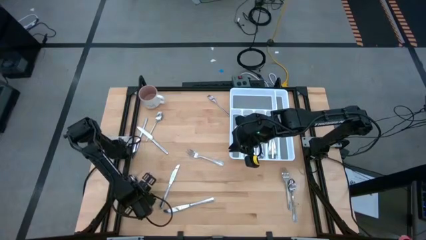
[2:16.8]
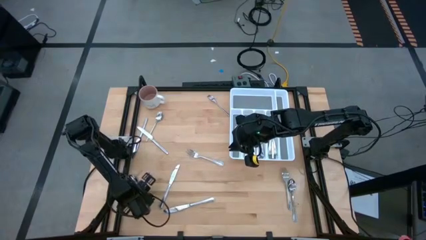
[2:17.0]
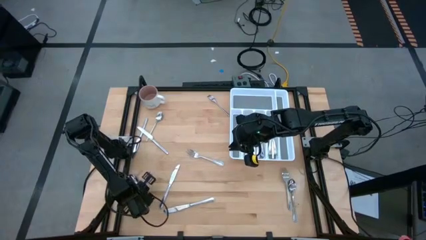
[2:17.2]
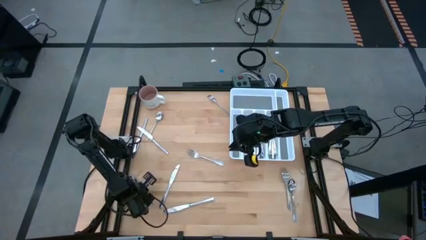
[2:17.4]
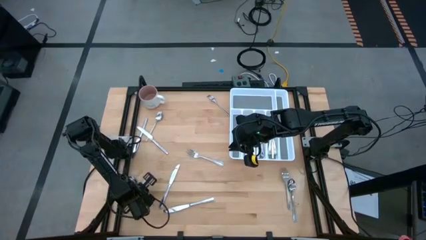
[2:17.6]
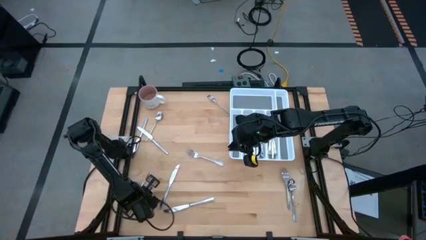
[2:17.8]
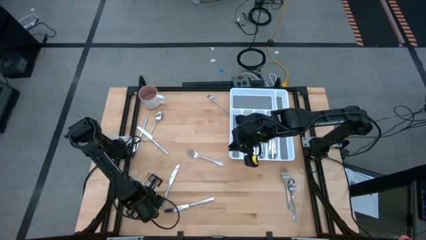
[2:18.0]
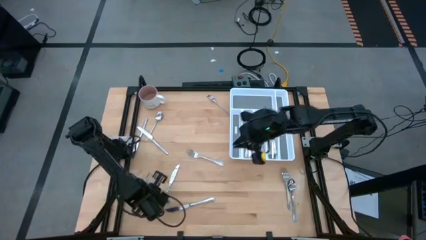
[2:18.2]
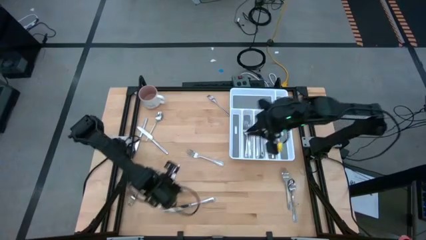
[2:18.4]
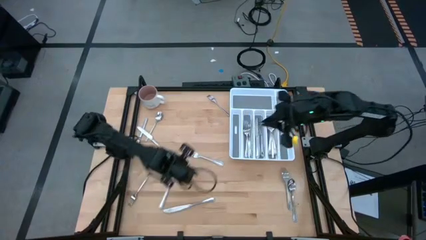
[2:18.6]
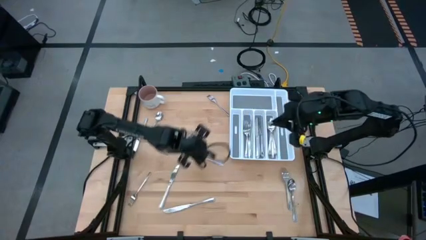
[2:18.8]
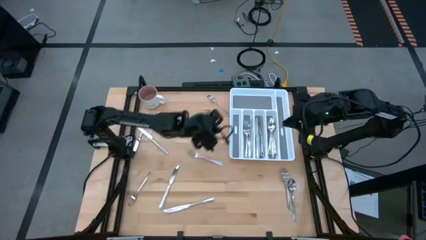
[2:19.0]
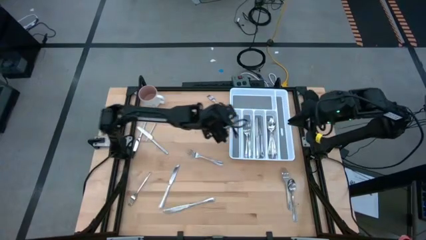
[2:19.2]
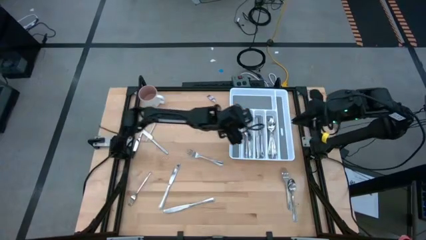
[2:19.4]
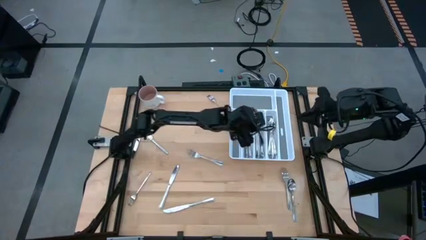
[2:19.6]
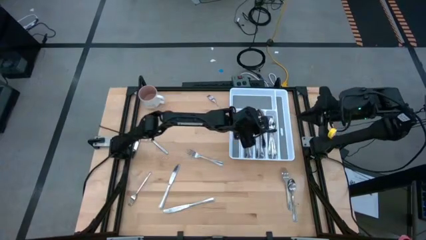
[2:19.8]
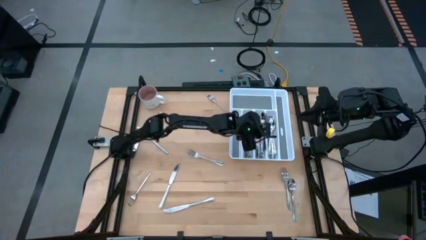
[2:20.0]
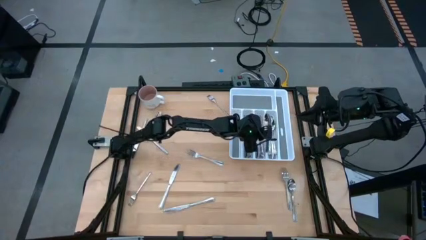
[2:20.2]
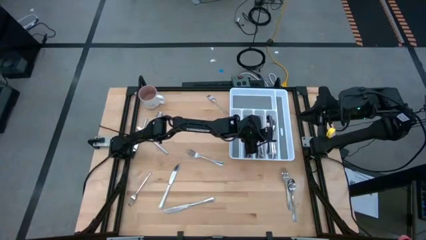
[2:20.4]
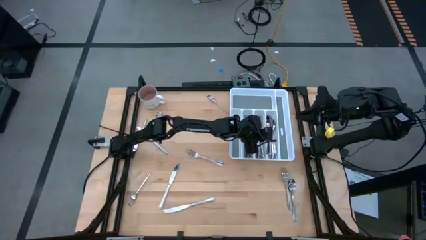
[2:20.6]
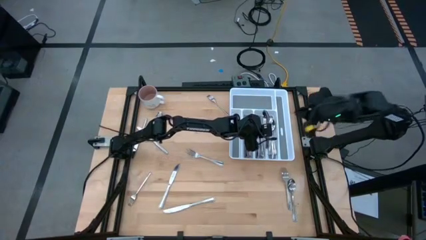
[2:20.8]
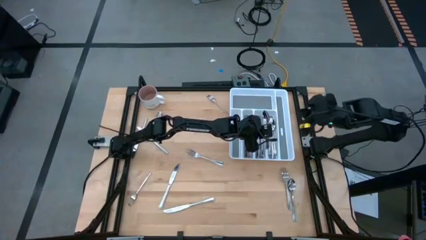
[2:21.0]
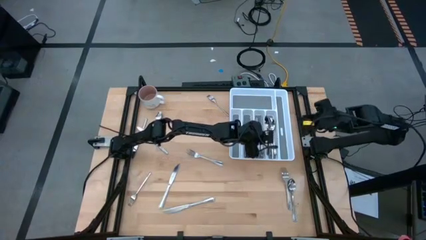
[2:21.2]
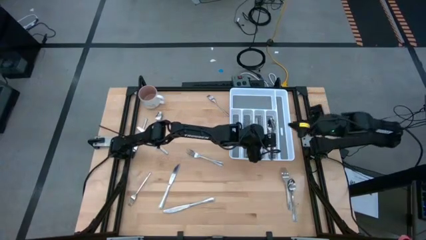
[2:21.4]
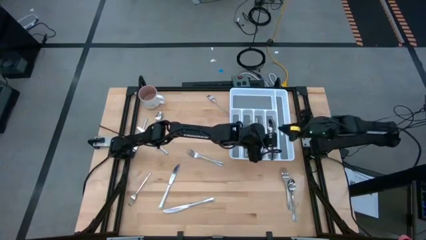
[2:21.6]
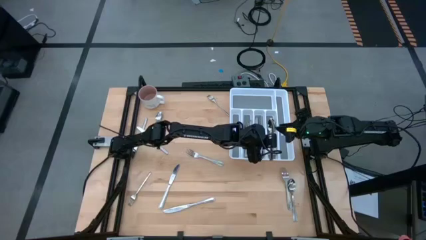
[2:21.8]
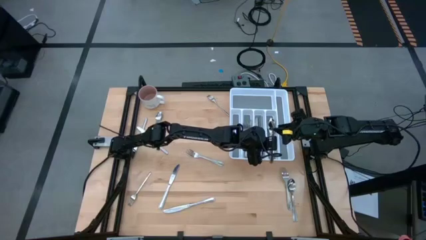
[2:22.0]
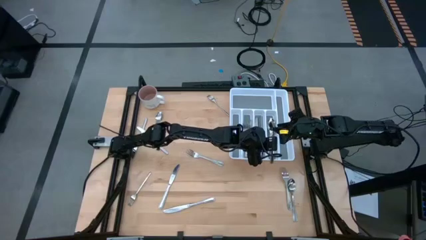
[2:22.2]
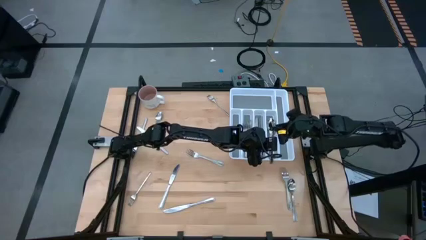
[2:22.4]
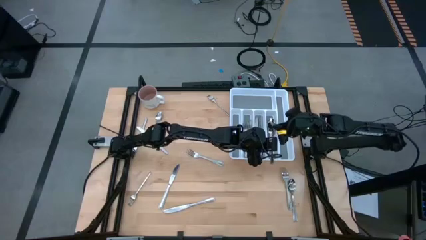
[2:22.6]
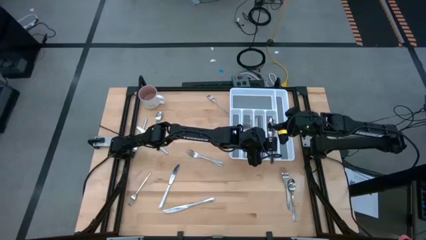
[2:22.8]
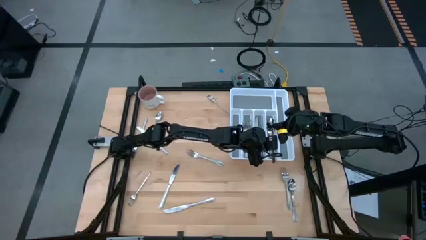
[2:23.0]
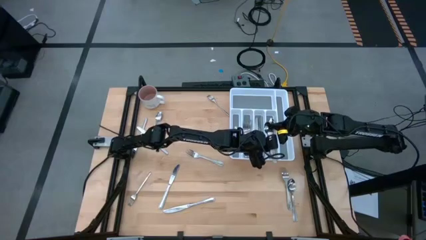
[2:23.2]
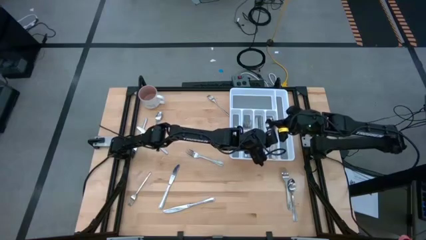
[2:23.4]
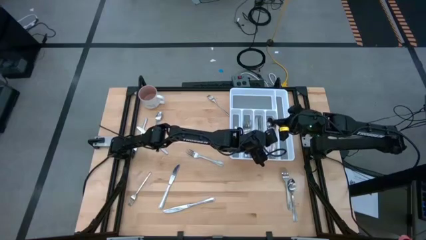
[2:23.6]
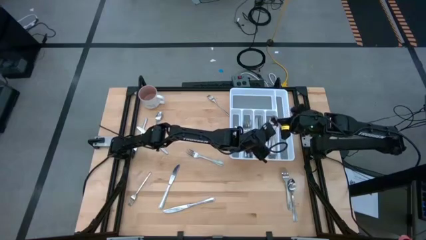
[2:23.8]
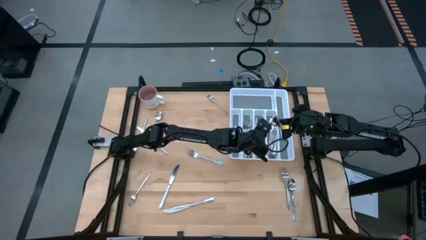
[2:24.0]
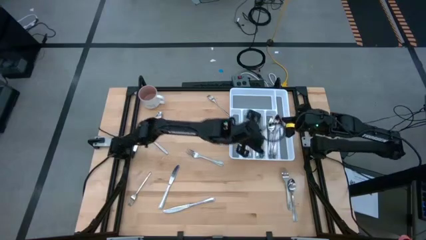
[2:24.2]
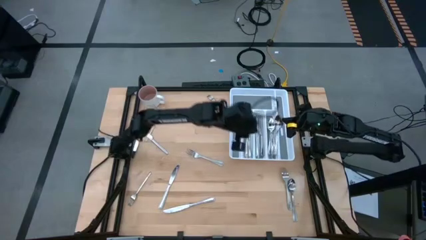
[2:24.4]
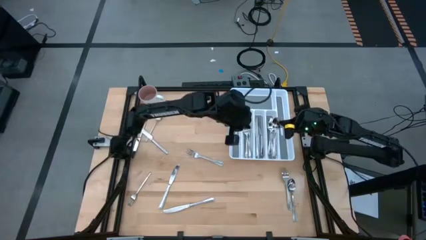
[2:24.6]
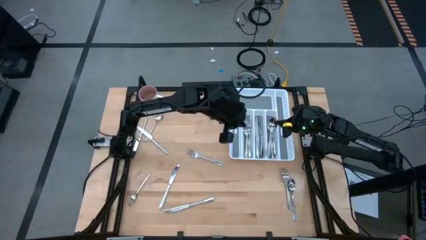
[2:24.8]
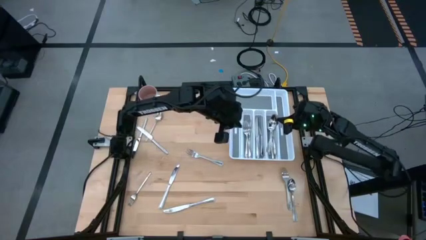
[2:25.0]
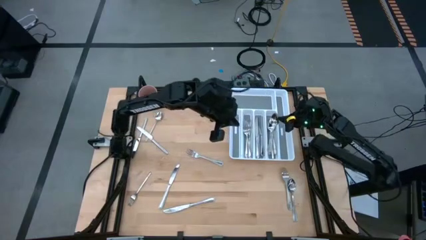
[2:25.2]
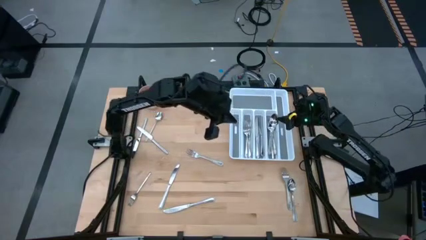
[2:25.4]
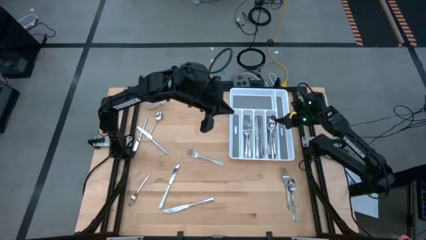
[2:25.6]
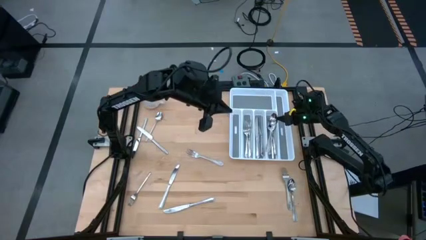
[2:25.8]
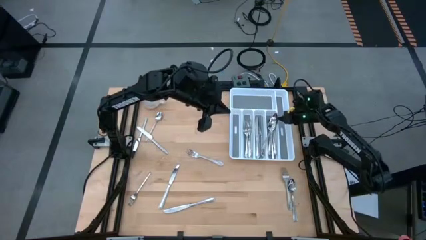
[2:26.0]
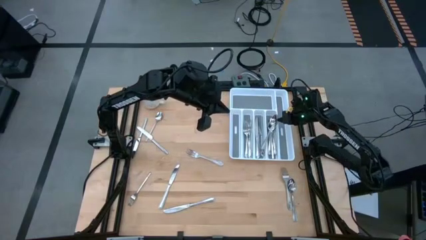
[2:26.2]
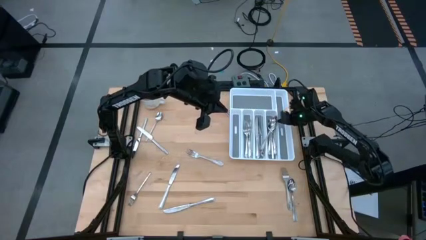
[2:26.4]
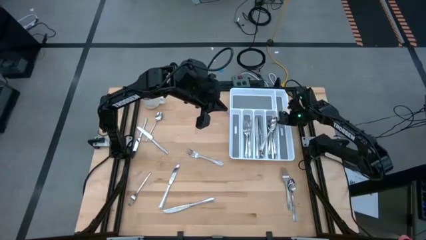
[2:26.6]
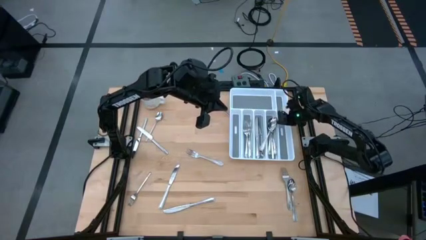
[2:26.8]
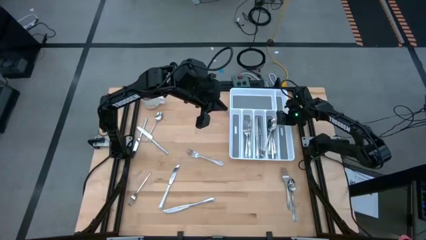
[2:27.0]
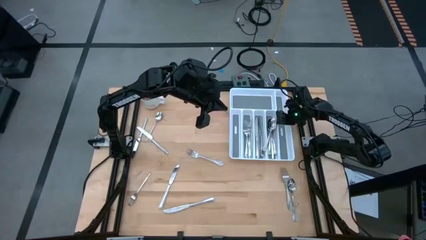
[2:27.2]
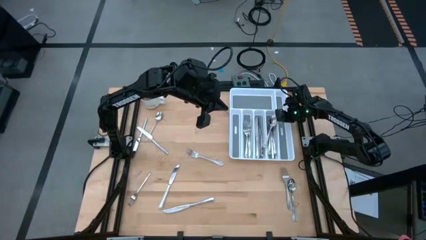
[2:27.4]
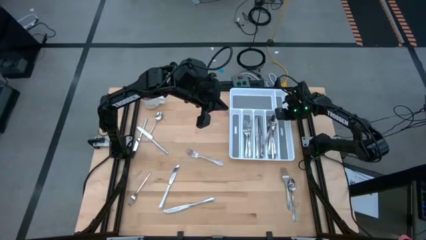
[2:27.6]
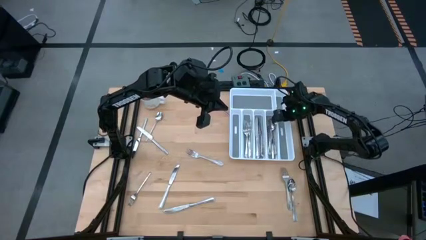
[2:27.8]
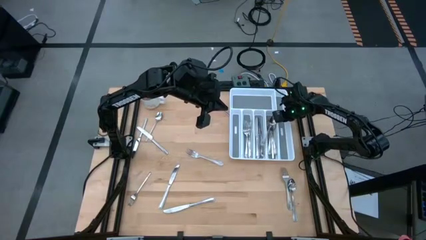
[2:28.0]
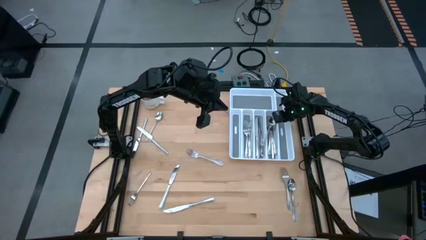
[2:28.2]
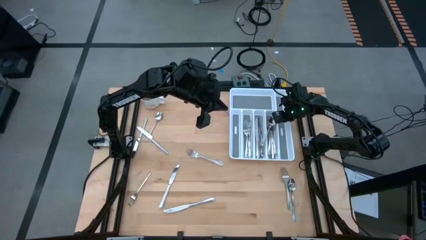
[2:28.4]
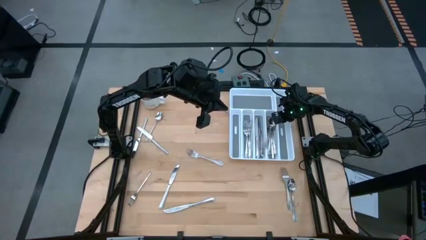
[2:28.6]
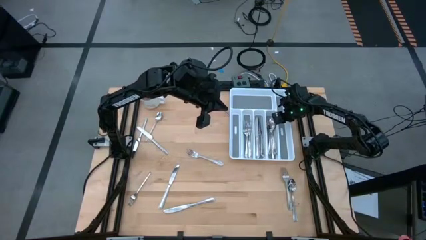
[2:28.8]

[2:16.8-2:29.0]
Task: Sort silverware
Put the silver spoon into the silverware tray

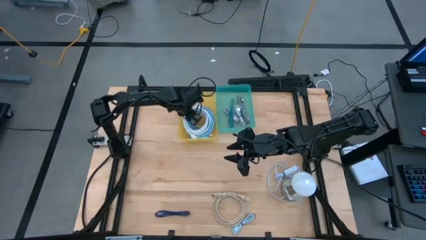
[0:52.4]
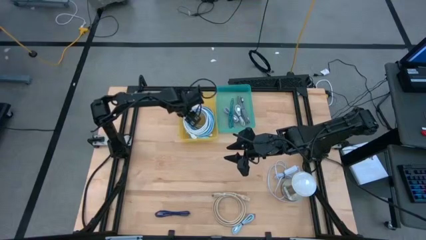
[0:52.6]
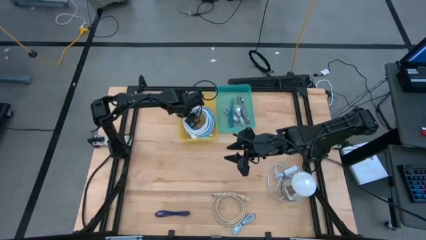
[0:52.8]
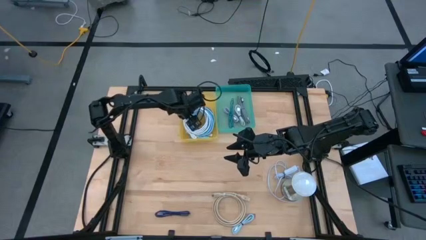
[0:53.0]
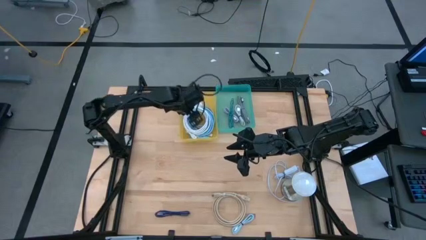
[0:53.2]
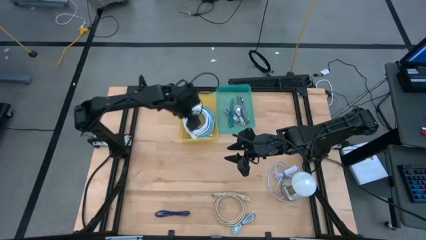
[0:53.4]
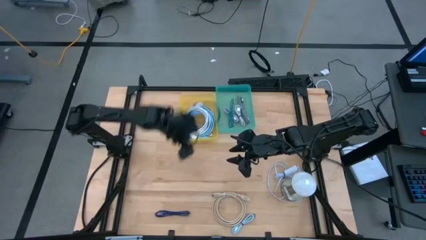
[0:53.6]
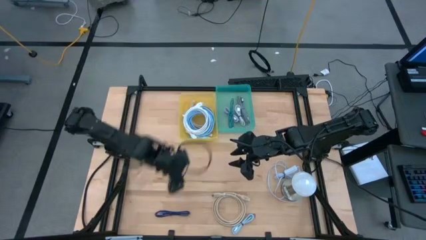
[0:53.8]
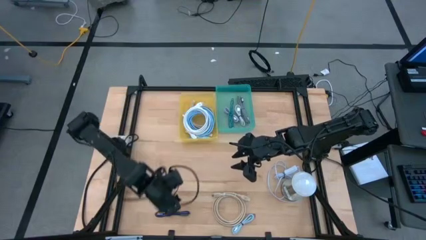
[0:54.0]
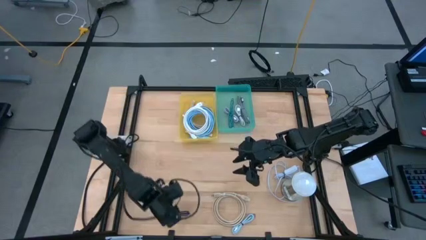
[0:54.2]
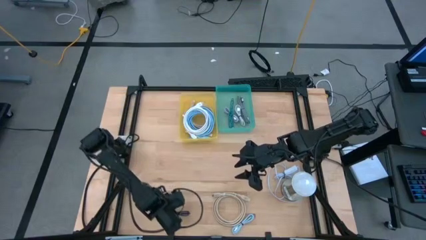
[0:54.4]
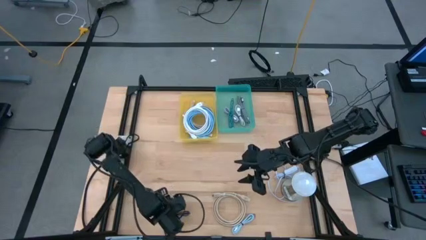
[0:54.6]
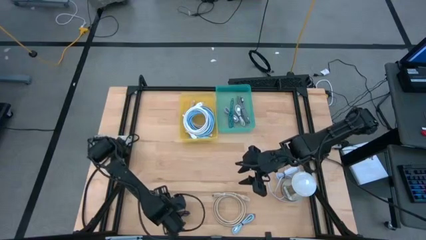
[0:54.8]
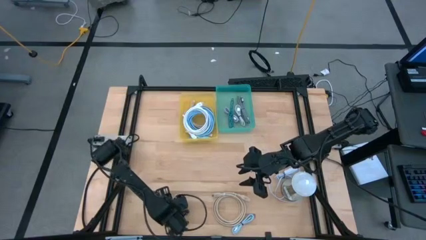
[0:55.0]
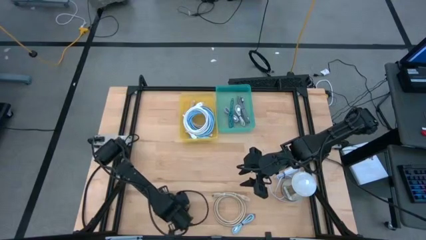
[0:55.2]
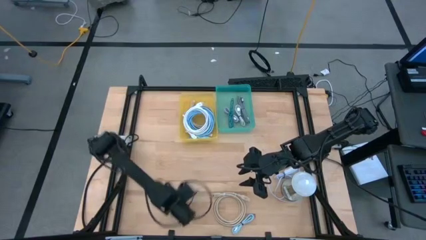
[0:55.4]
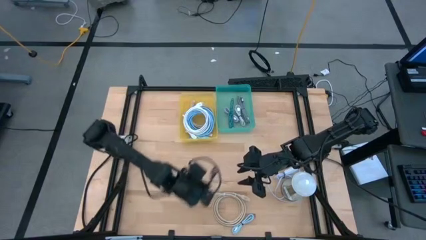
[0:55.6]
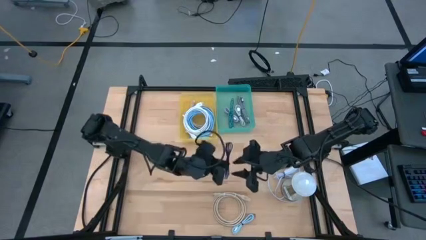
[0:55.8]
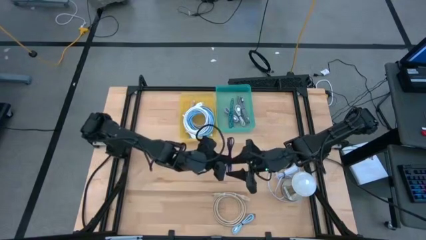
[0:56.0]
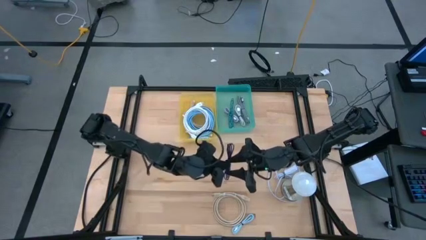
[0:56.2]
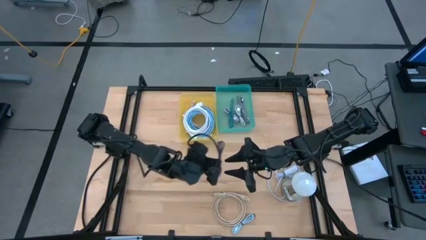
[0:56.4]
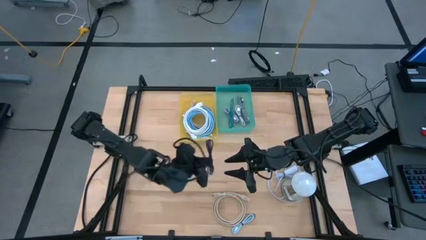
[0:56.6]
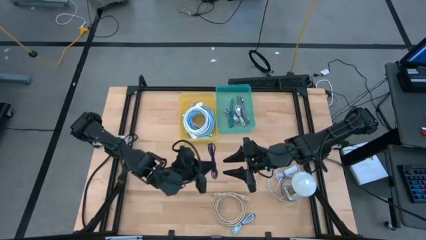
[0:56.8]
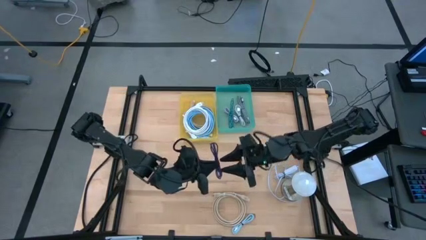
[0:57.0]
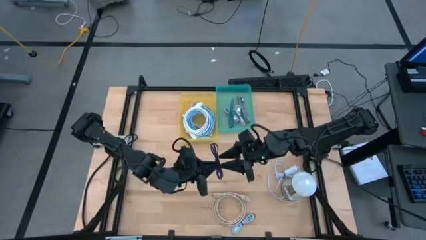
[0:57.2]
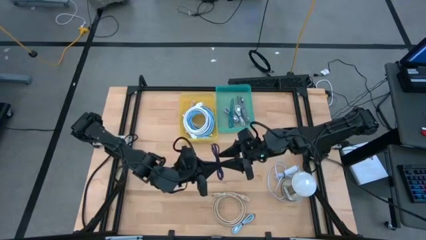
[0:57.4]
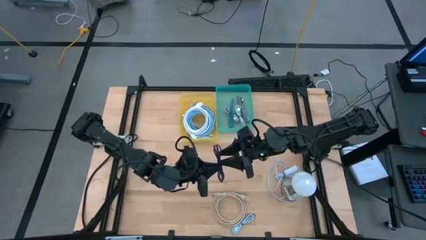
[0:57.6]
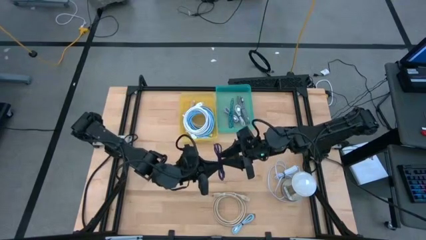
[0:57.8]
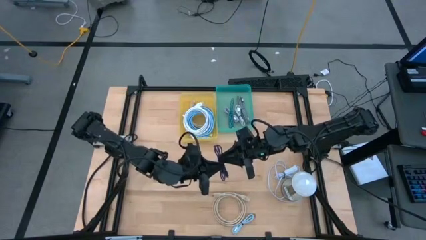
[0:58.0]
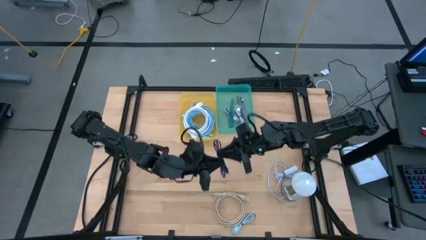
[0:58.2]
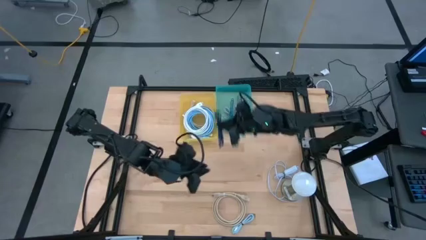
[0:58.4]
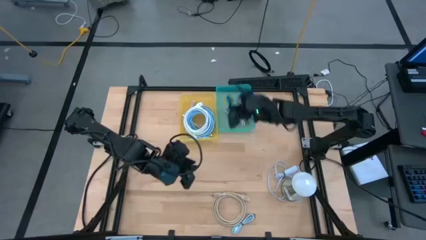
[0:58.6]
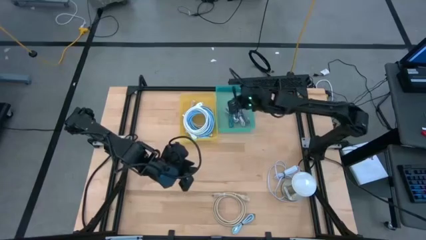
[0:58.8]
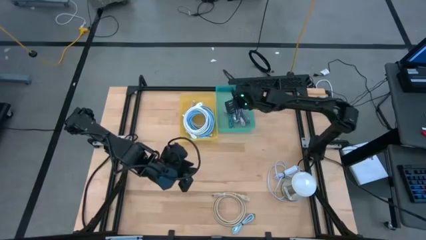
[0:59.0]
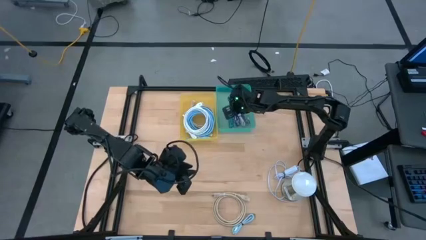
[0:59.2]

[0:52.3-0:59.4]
Task: Pick & Place USB Port
Put the black and violet charger cable into the green bin
